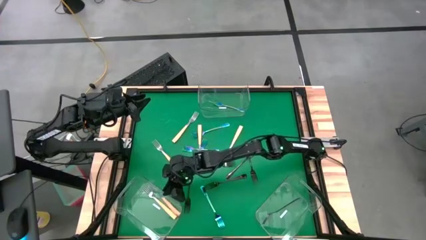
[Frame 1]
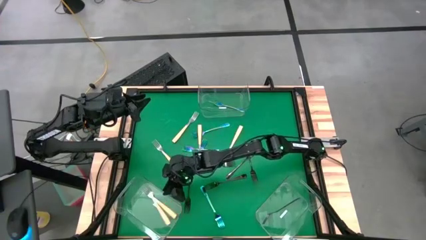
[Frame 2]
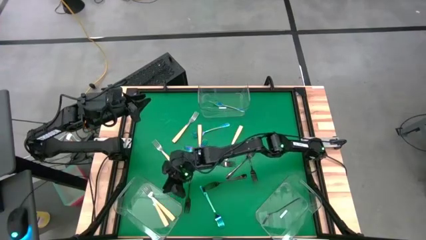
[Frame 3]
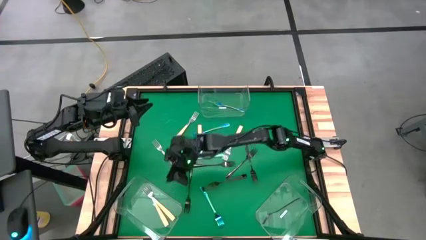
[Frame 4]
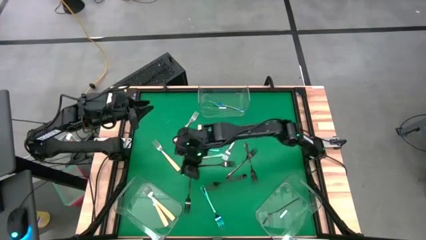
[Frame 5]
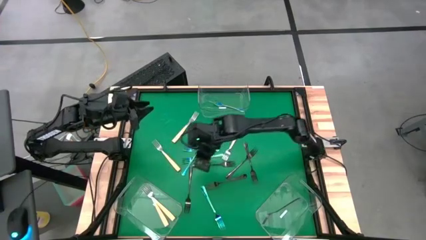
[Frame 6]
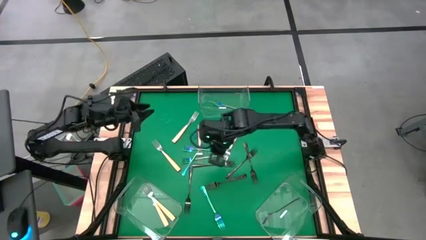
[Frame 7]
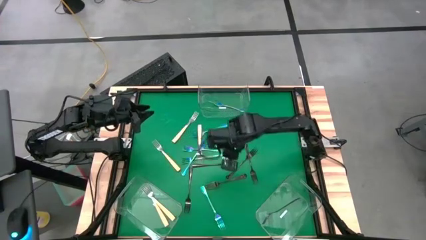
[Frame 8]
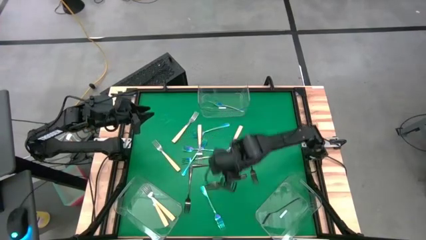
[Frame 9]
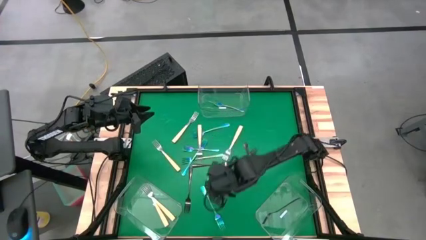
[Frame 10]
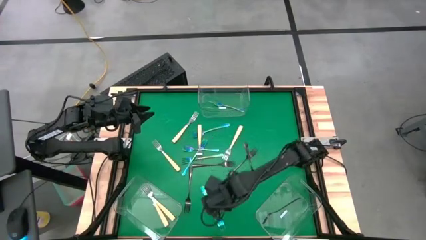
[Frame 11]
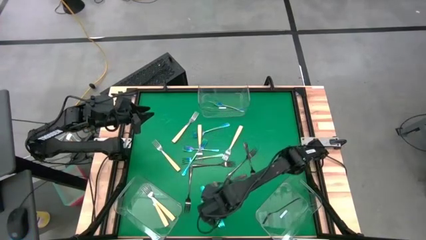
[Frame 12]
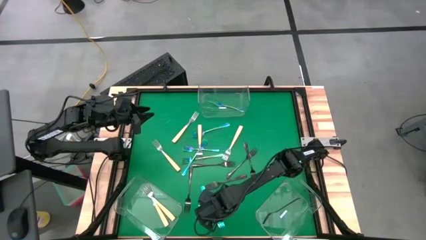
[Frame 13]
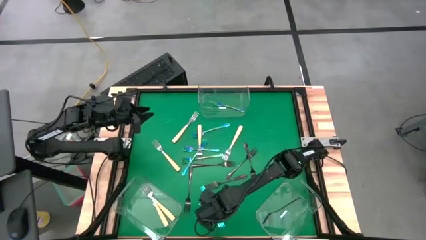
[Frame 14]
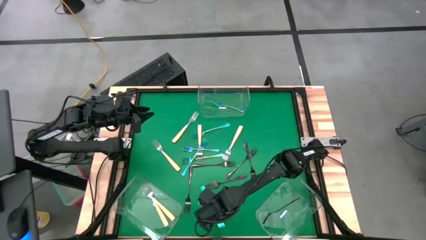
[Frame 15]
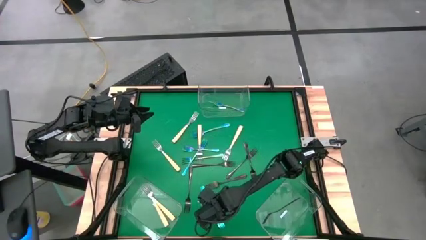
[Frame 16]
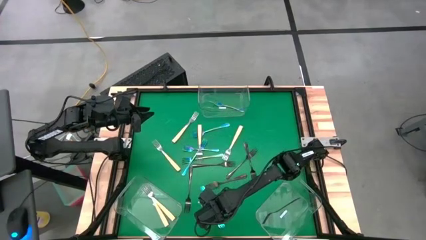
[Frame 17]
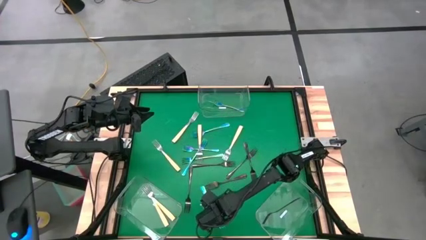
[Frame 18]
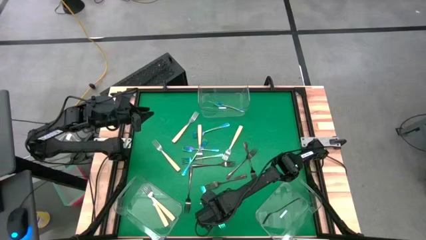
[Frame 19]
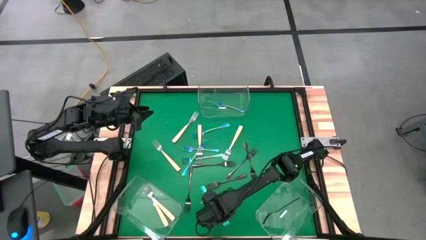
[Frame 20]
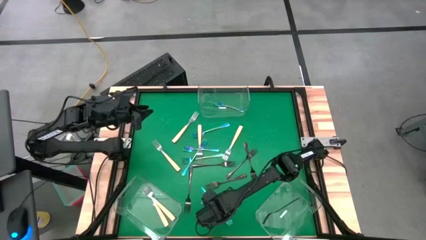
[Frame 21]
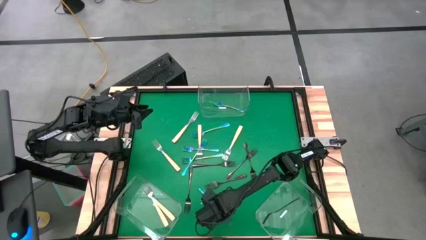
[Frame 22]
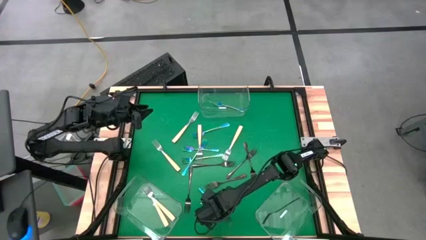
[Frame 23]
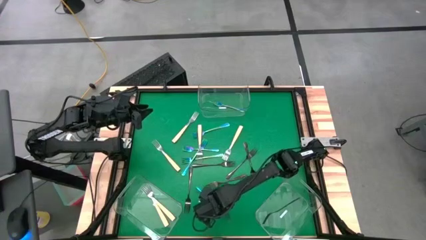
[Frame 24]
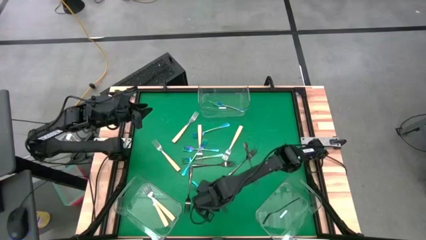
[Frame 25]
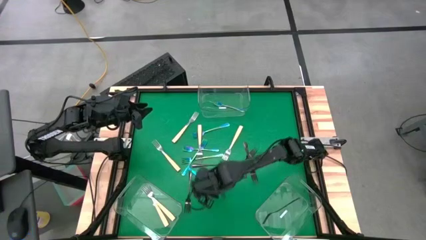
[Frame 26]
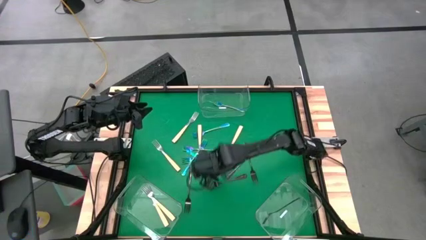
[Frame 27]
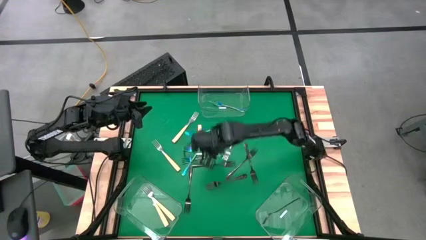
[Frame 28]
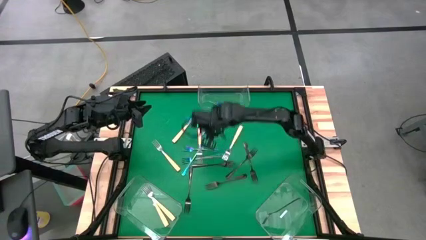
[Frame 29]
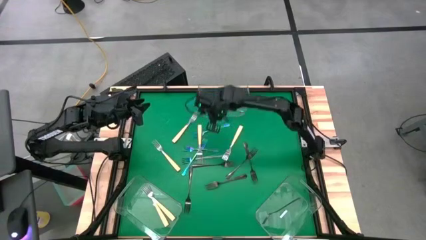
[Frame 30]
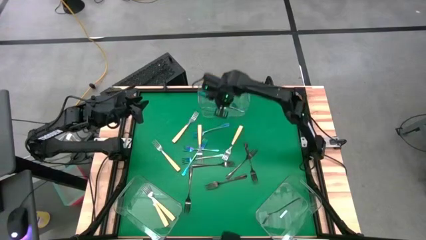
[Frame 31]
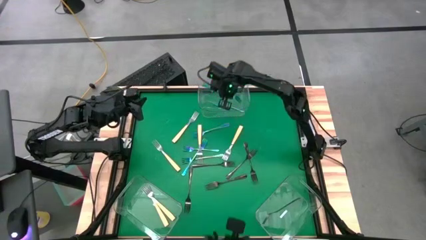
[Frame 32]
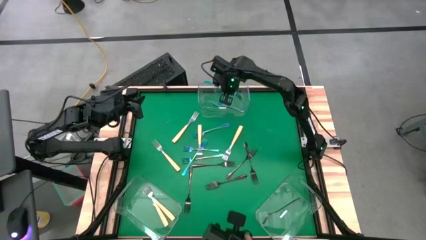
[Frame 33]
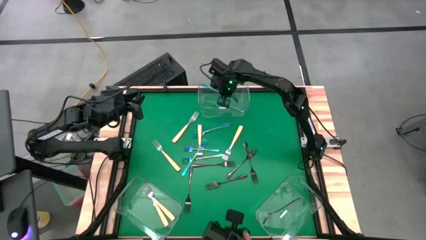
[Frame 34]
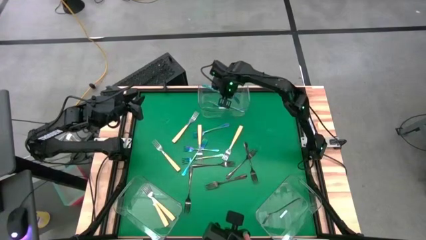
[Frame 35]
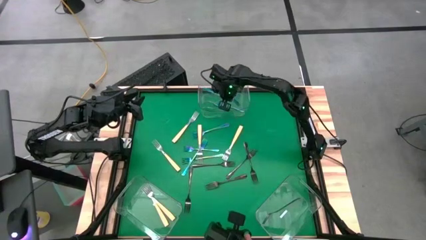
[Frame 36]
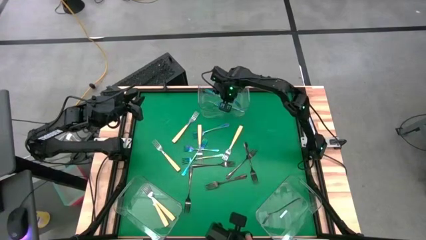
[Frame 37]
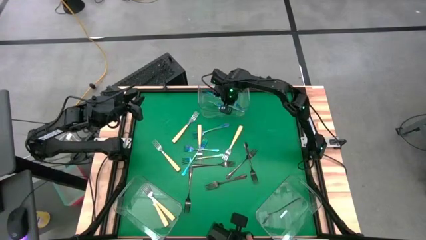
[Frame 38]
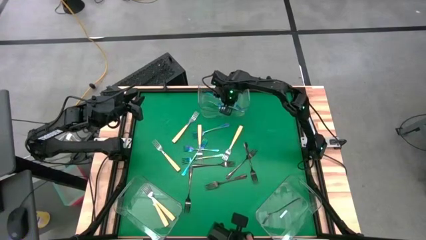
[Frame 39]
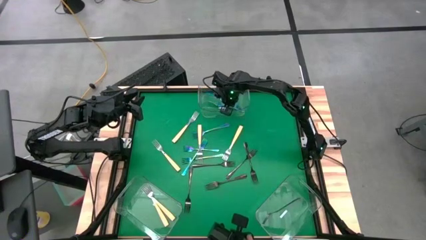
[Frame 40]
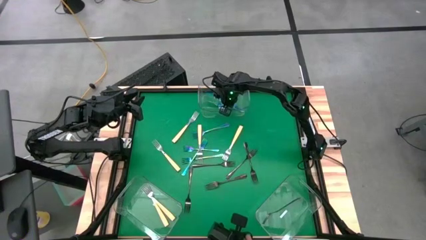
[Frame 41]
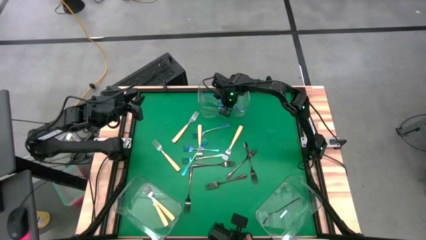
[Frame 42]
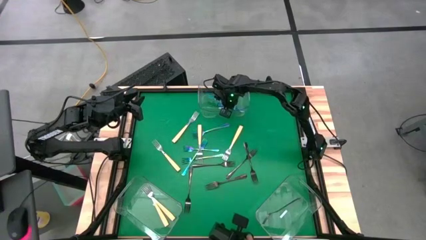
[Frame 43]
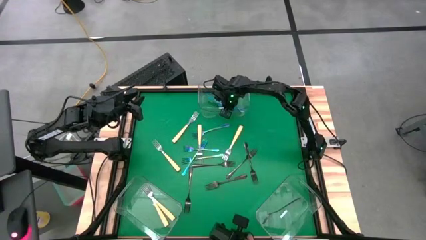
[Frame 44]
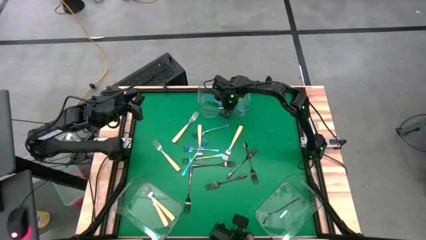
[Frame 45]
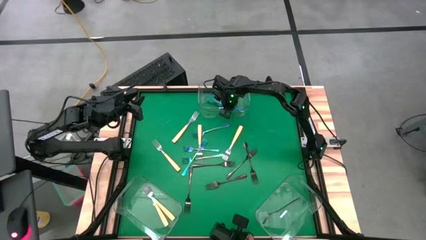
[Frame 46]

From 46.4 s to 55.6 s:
Task: Sort silverware by color (type)
Put the blue fork into the top transparent bin

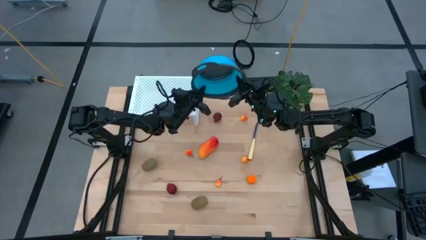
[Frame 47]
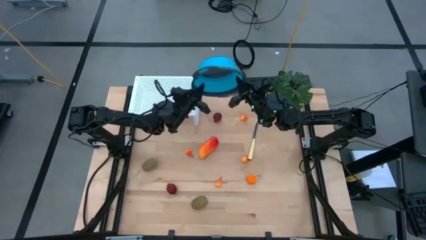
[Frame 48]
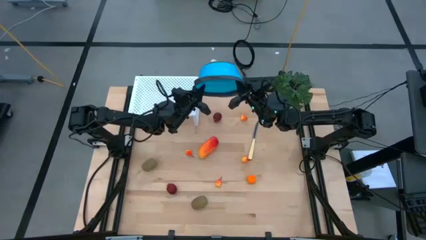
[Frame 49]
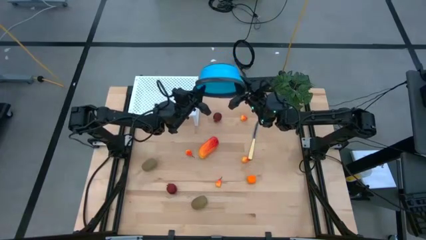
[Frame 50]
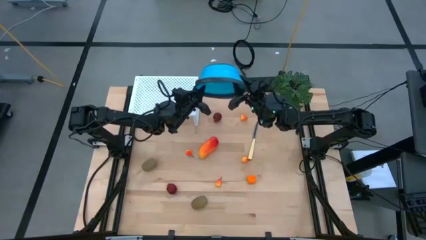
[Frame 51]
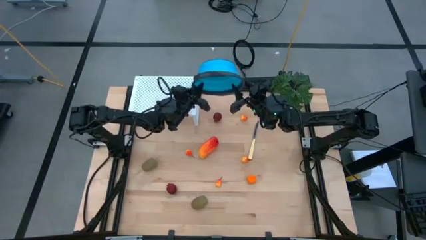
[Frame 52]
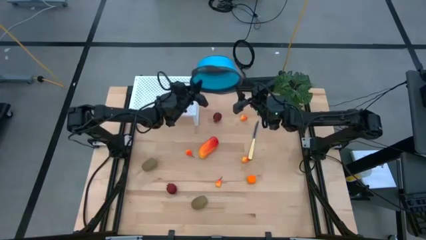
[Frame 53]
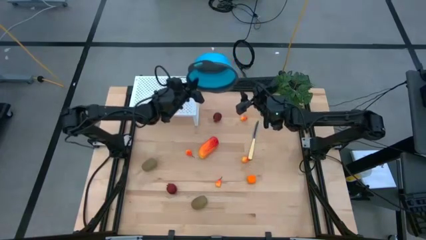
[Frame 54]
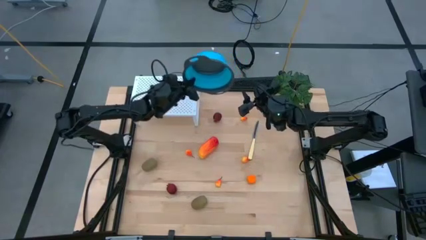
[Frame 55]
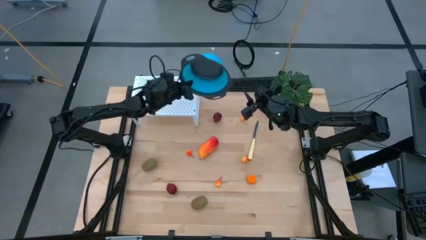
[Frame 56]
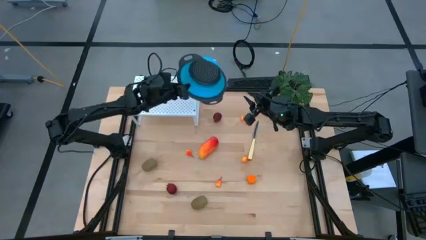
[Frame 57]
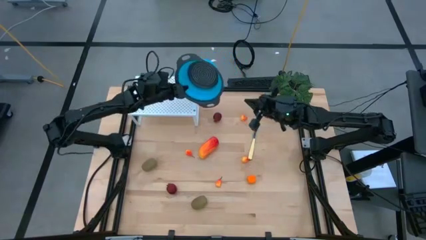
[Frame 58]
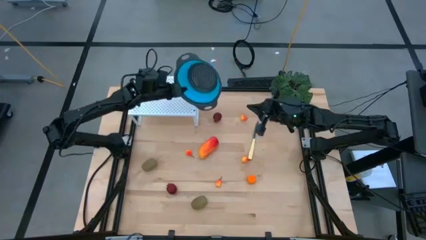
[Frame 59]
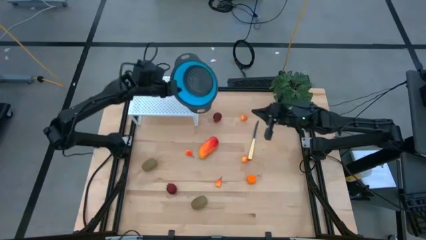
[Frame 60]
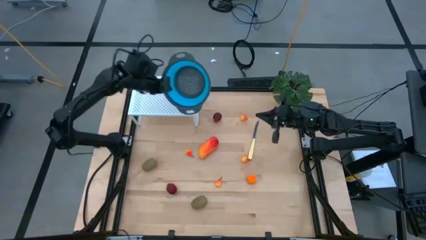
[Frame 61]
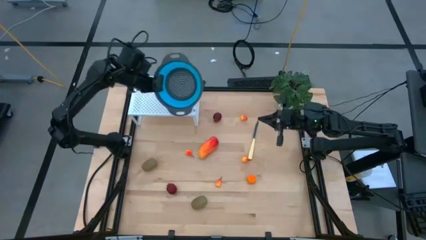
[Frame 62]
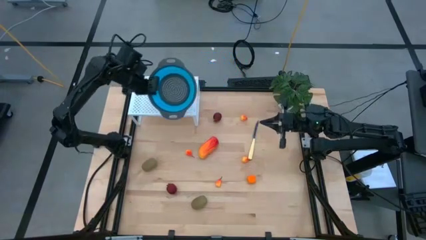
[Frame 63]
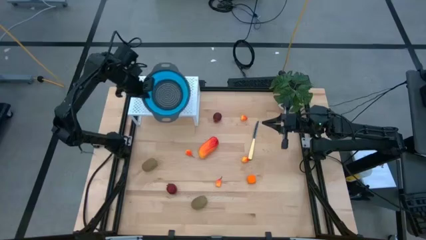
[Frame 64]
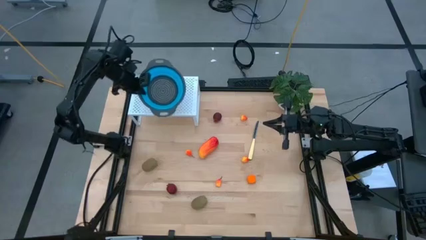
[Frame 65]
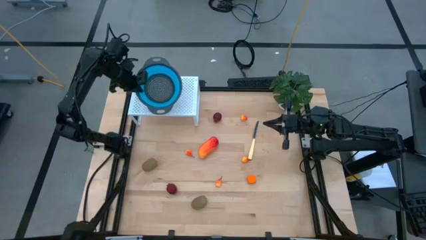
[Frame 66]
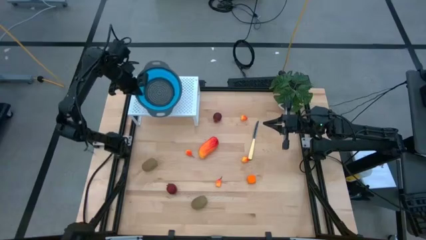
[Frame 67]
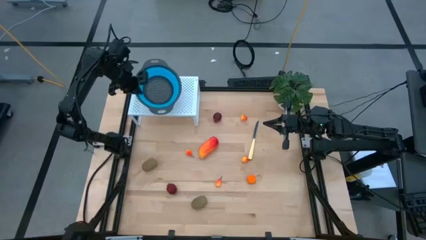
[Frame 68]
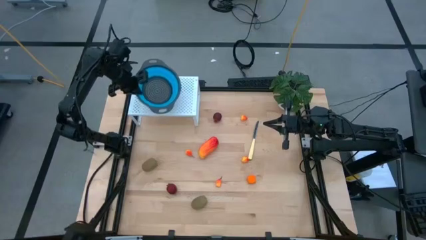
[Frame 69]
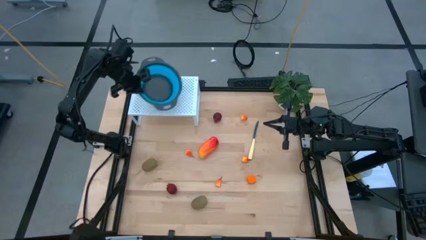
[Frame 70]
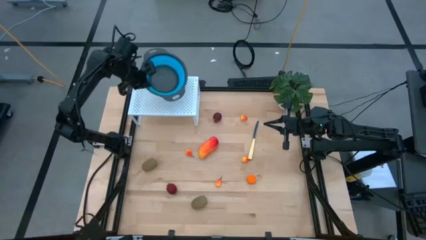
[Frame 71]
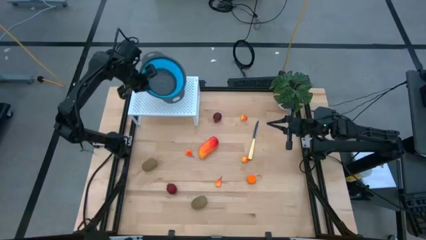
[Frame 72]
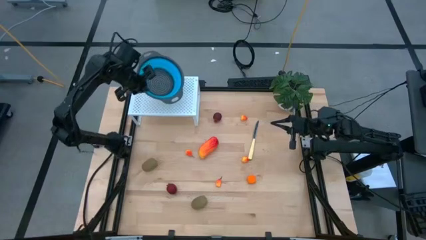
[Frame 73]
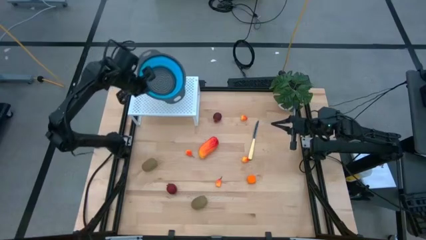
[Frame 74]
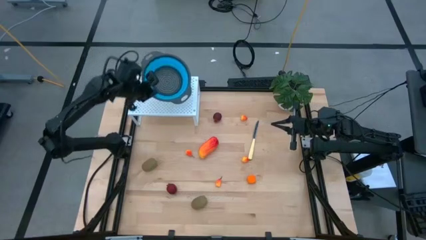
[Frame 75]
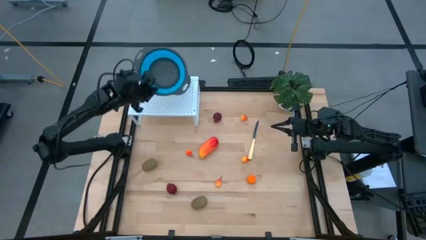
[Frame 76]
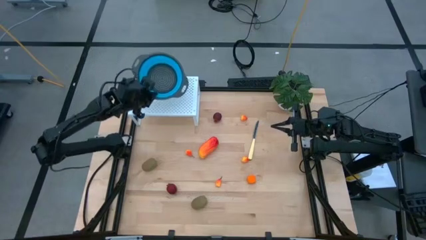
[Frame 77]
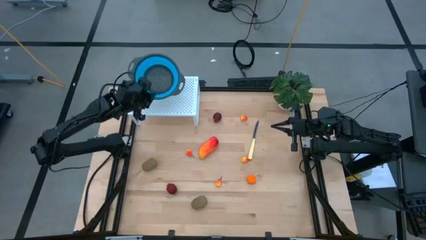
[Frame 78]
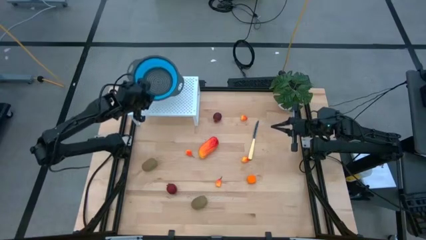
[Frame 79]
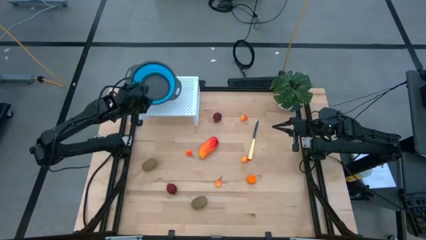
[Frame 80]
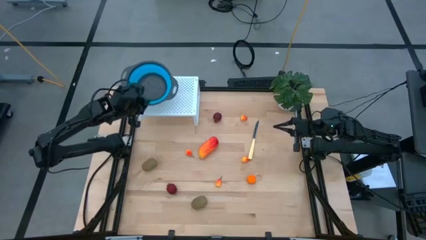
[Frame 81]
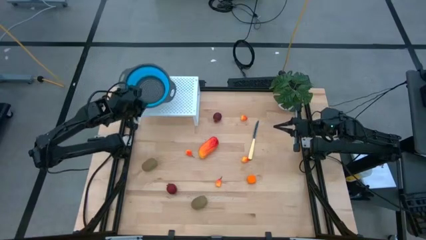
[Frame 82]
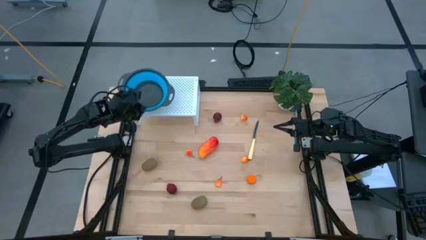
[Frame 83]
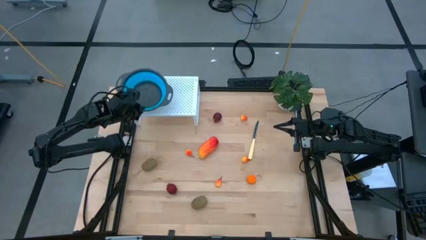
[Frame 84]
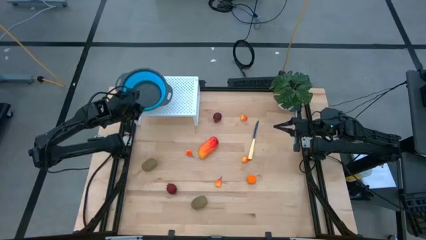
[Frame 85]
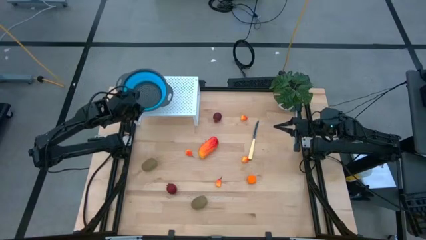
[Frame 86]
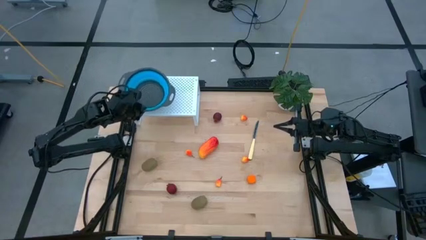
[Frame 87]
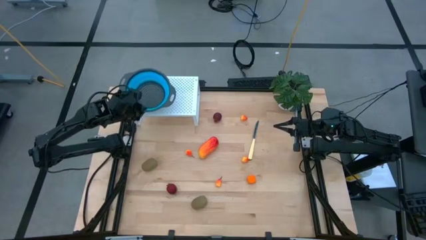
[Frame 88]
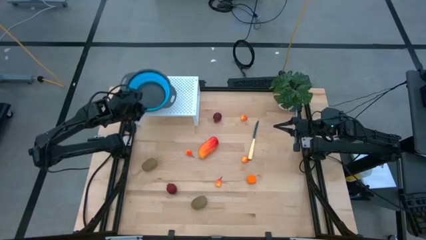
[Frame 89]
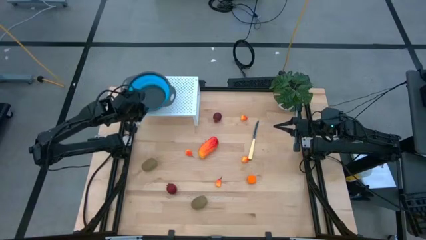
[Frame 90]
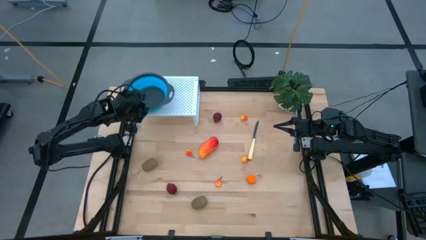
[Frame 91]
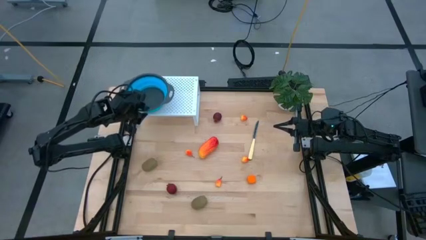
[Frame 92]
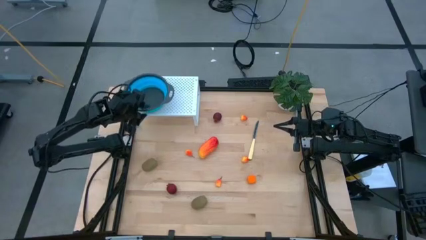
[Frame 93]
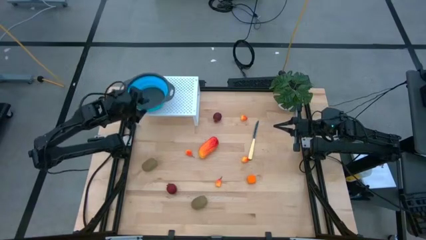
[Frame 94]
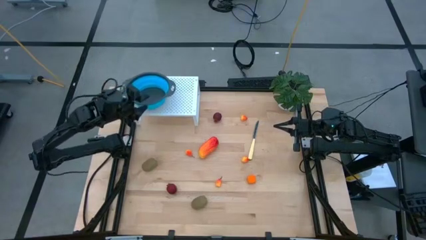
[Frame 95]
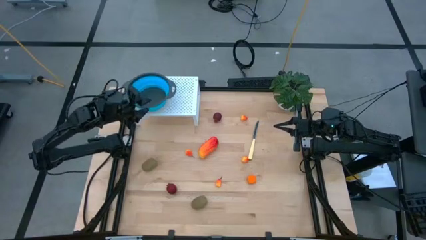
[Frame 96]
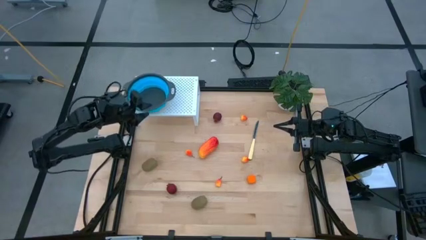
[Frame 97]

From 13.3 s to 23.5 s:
Task: Pick & Place Fruit
Put the blue blue strainer bowl on the shelf
